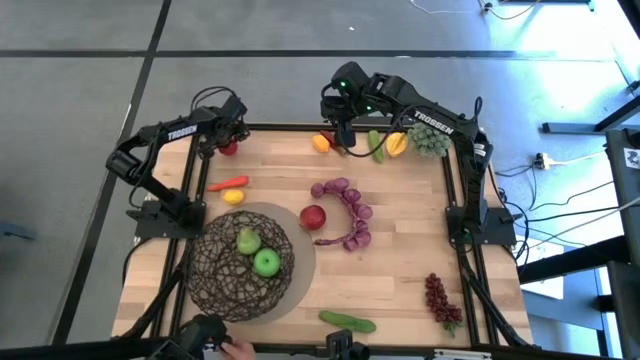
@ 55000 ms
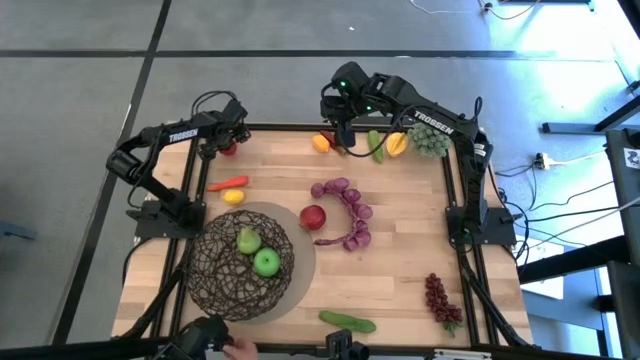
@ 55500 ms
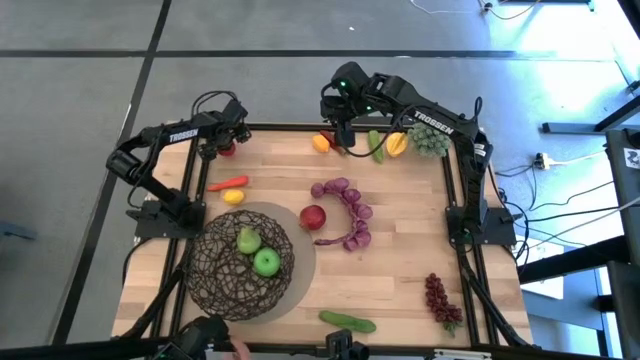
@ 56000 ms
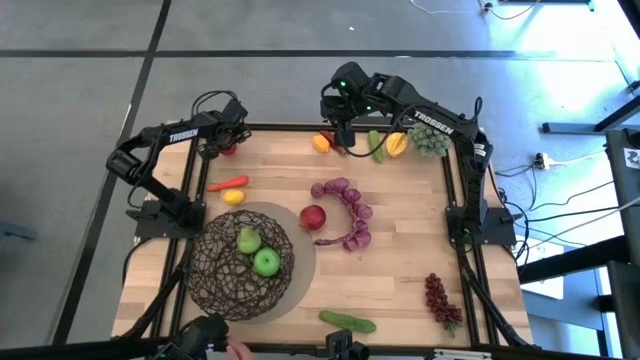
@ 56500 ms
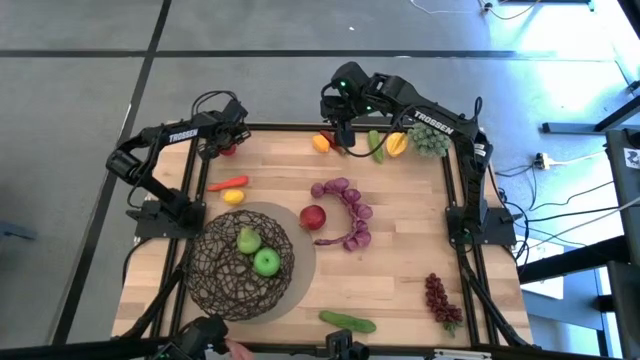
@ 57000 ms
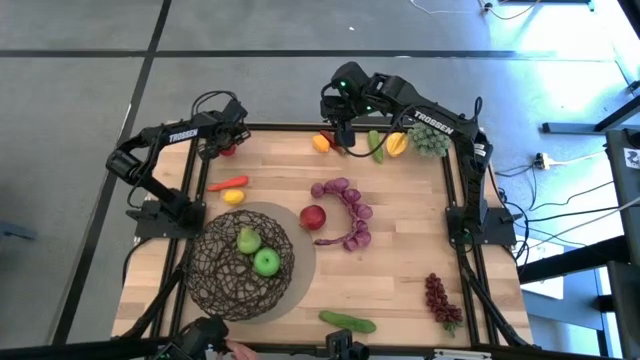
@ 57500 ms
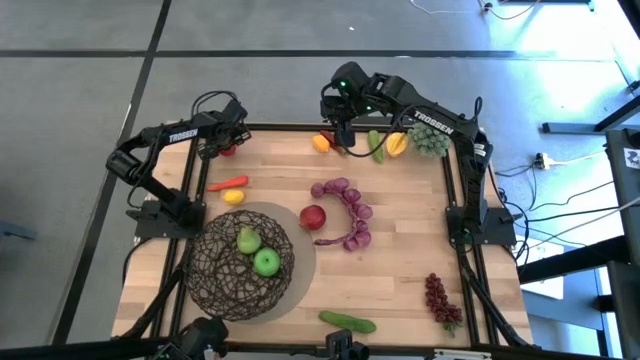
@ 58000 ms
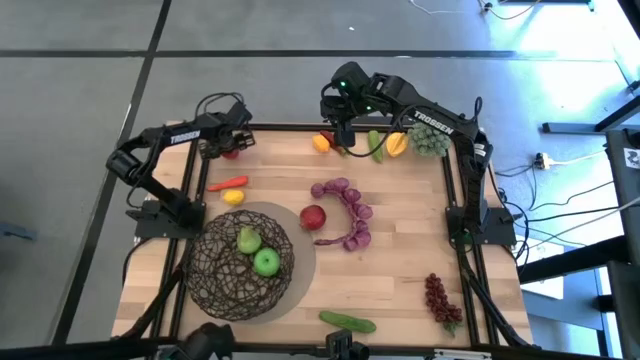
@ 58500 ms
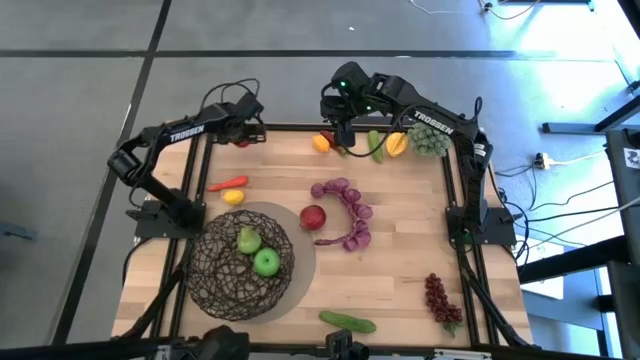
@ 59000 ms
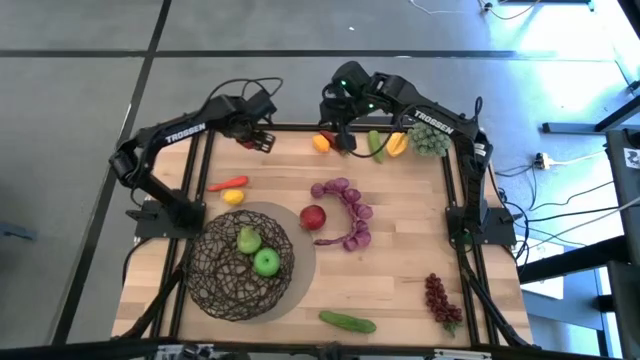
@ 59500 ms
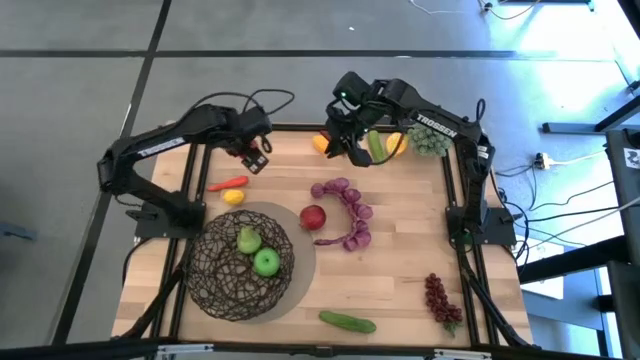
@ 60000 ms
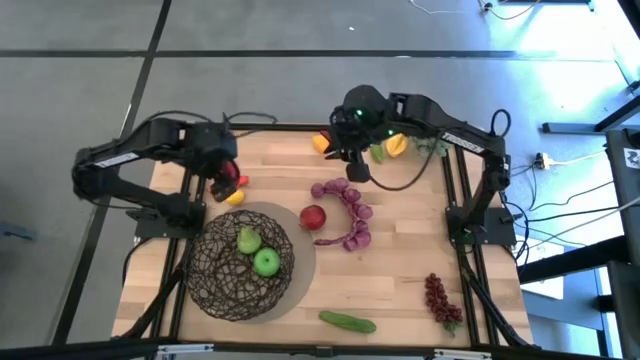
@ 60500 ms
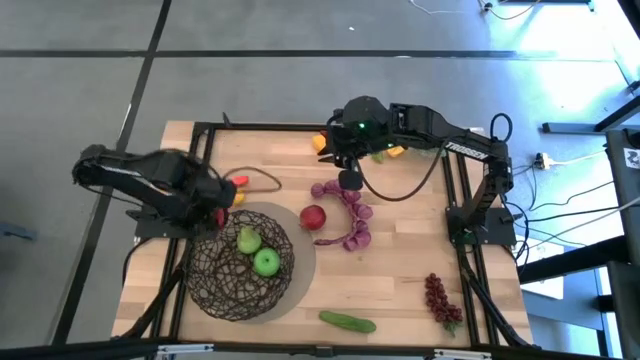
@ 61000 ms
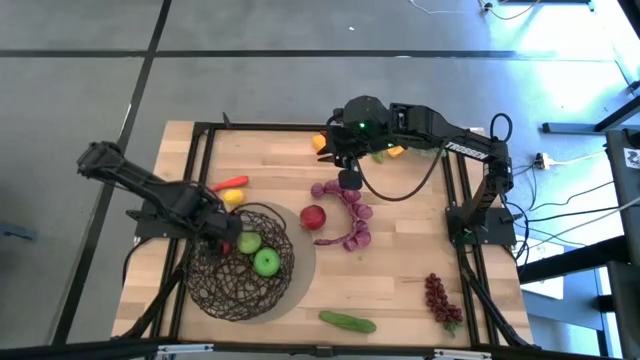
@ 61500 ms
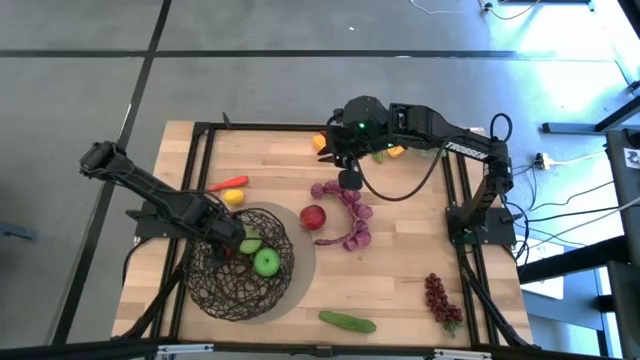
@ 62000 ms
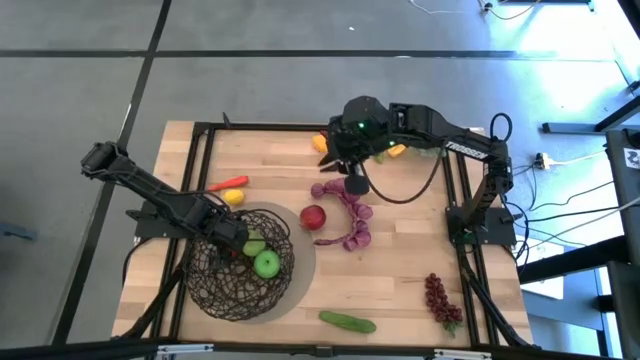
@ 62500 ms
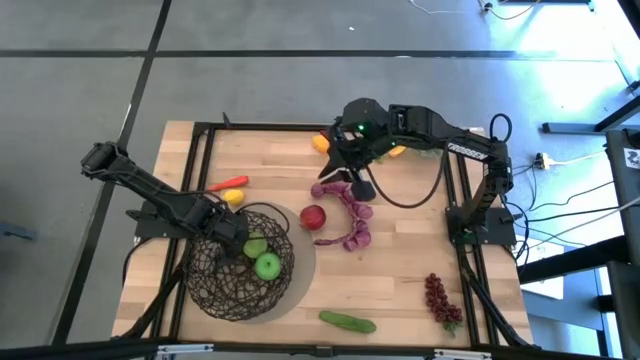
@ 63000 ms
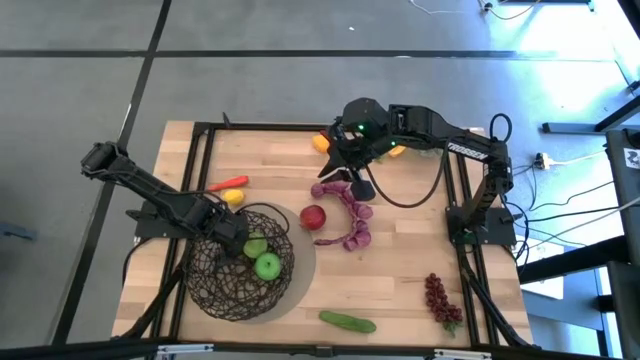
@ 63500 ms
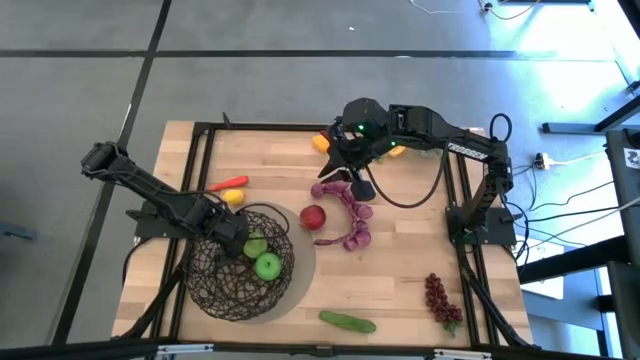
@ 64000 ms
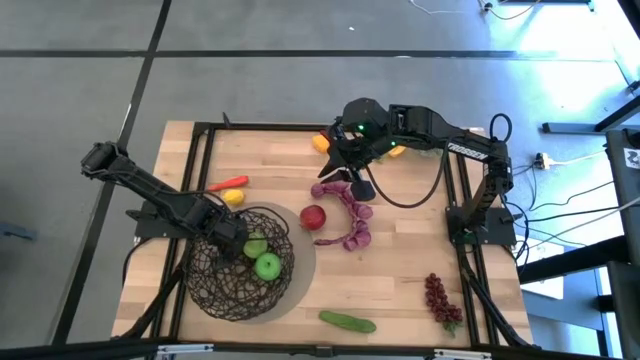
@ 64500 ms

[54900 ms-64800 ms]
Task: Build produce basket
Put the red tomato into the black wire basket

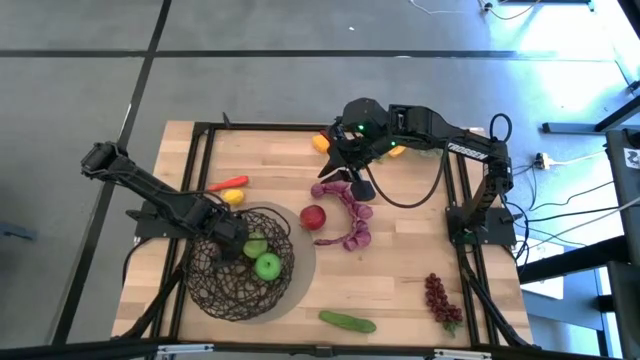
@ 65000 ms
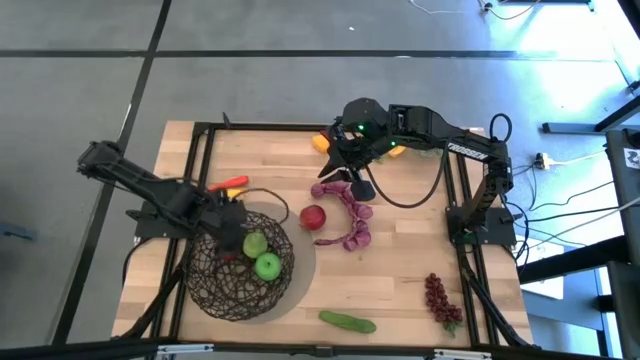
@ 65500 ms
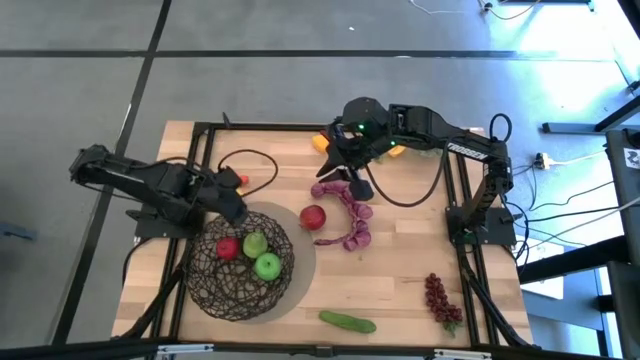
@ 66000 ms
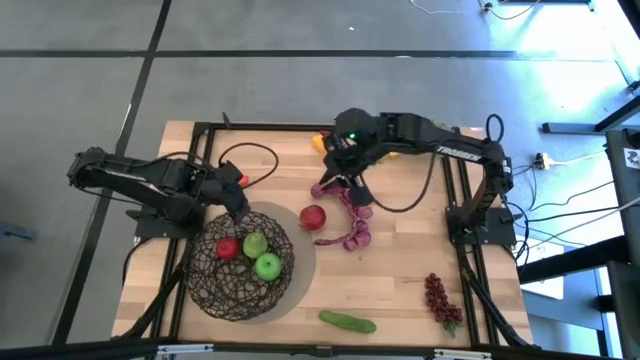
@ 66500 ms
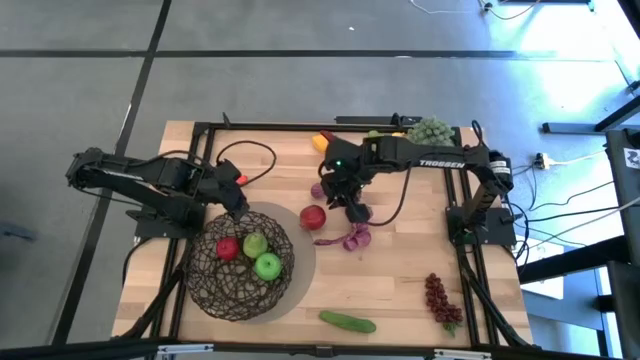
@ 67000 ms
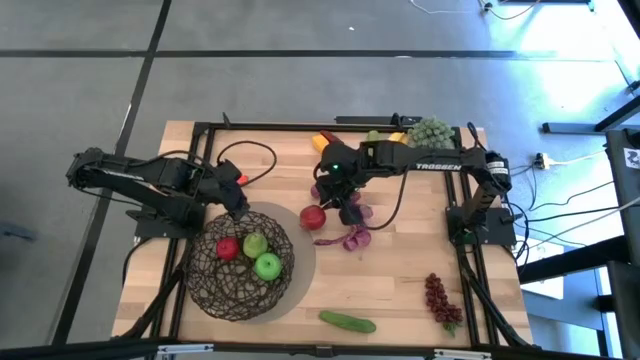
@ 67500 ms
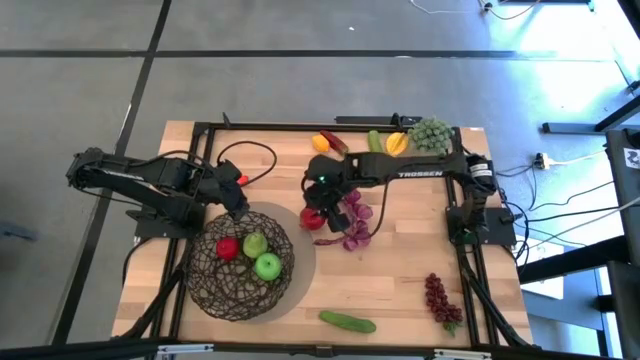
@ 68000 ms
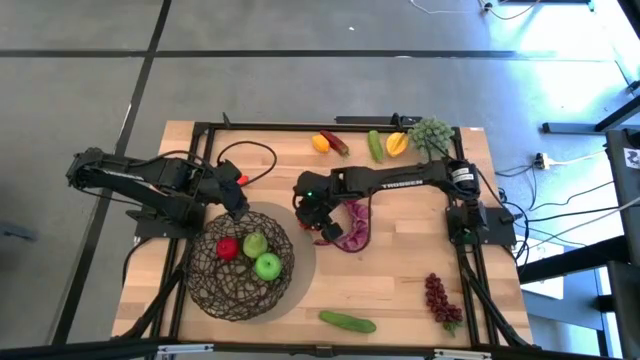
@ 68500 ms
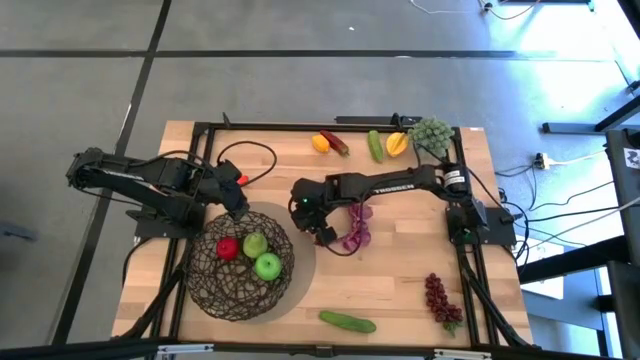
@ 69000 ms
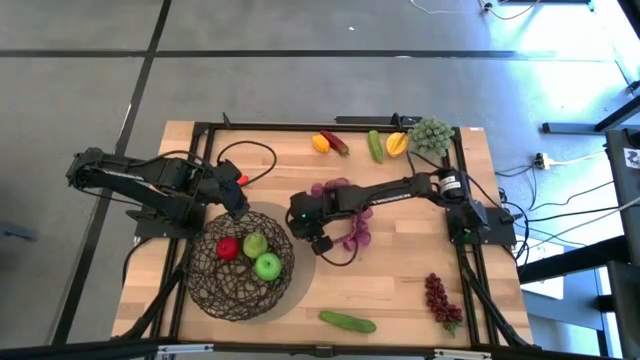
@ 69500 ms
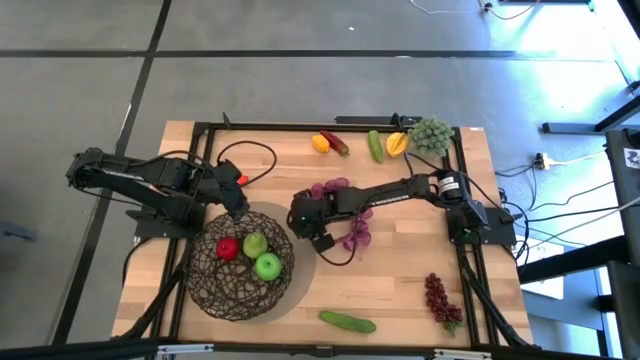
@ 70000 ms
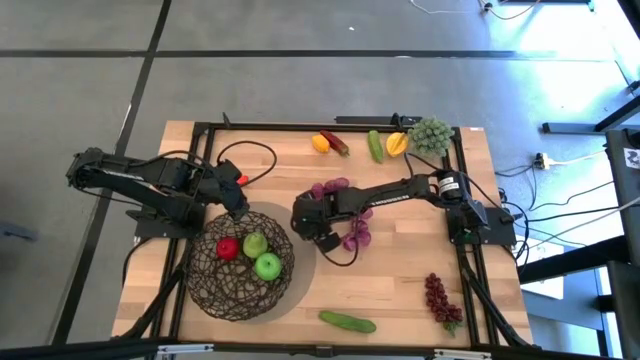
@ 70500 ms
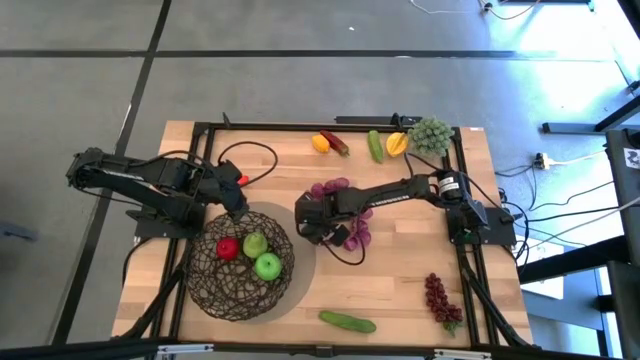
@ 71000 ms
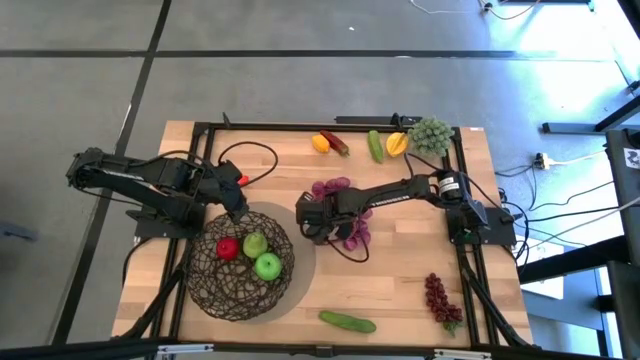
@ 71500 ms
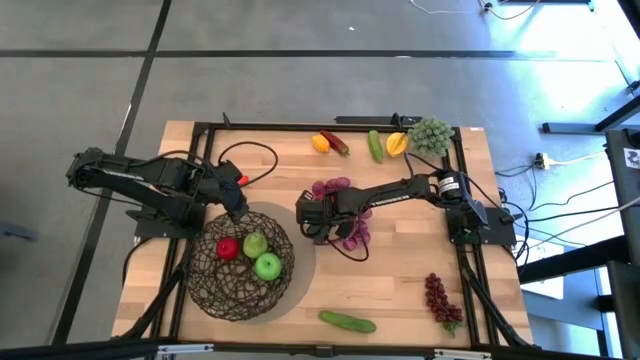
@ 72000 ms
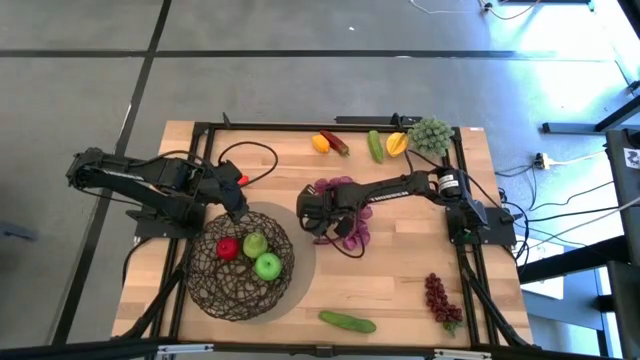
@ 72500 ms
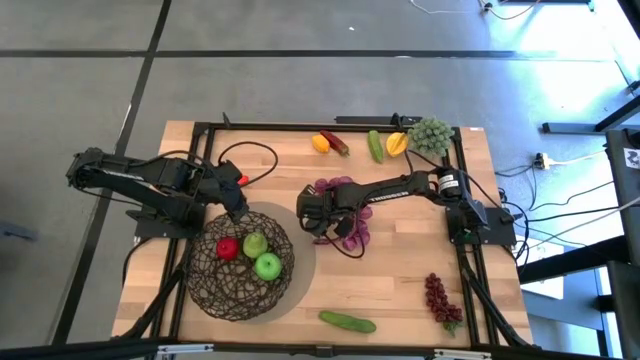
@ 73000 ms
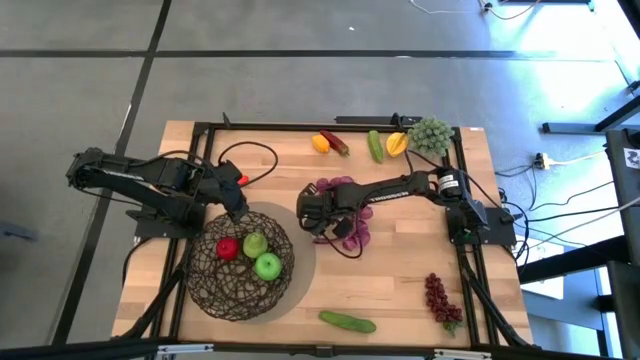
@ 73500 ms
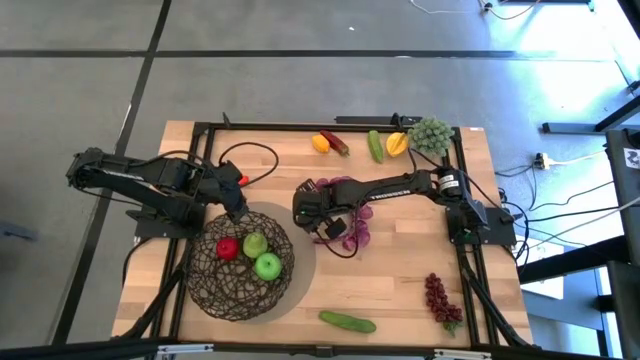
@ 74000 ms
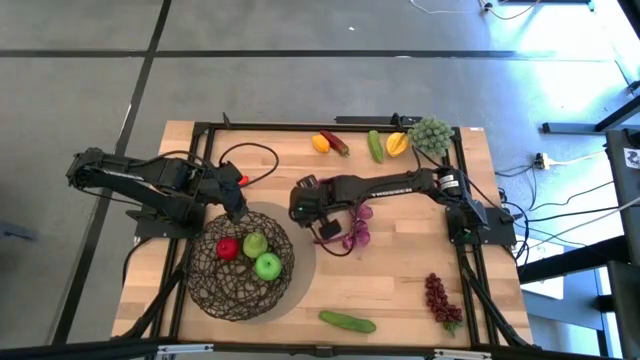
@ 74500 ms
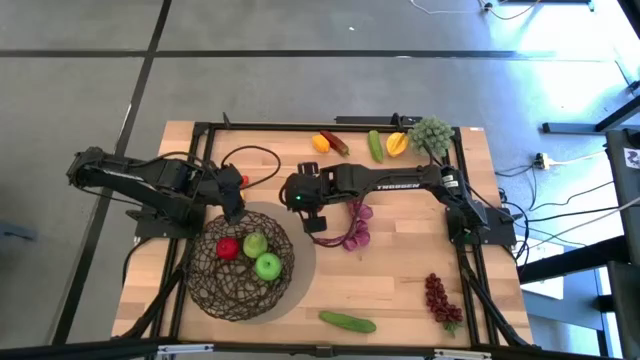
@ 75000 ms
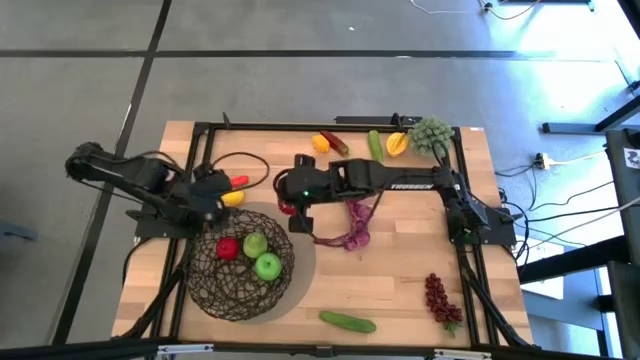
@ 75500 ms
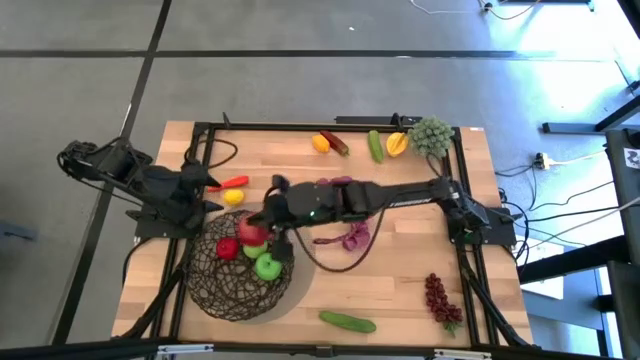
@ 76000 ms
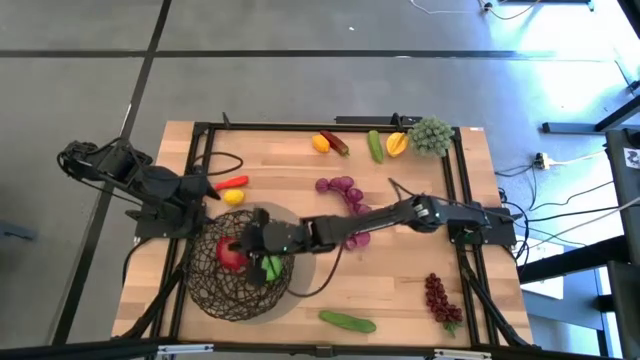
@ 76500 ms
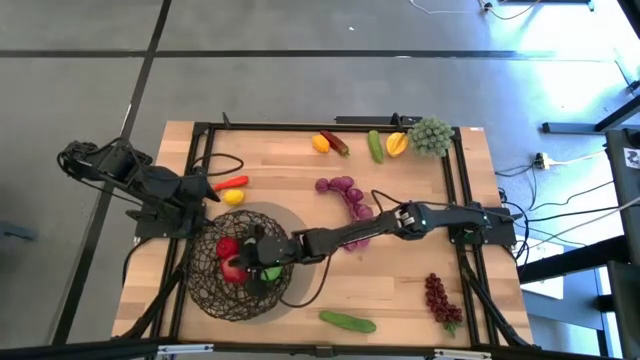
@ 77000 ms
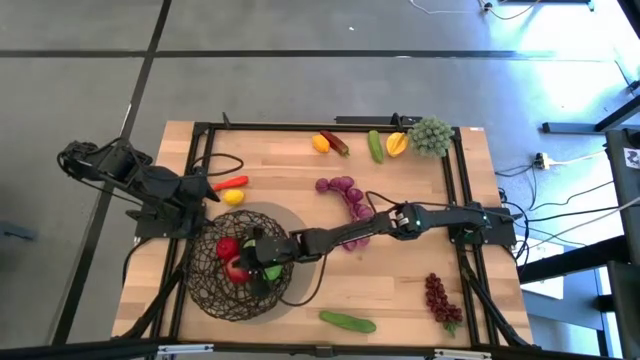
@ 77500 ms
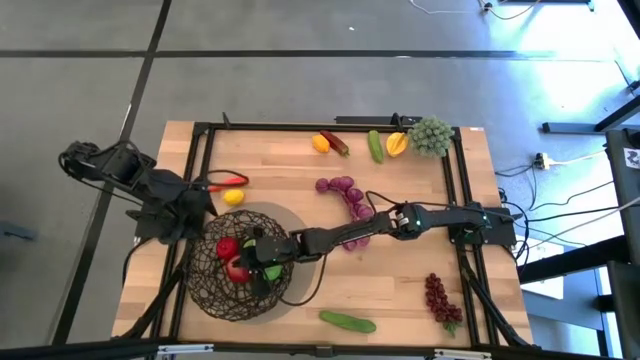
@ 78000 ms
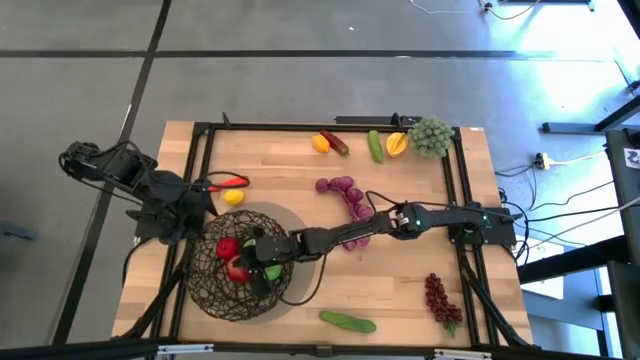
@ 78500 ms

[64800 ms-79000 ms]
Put the red pomegranate into the black wire basket
